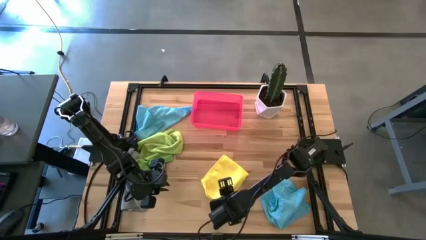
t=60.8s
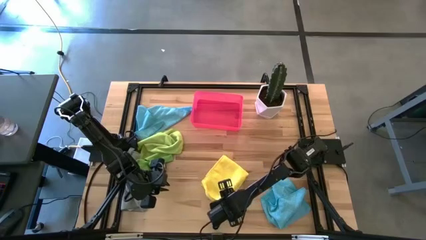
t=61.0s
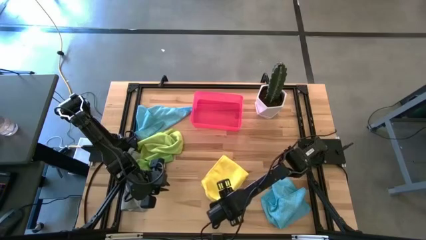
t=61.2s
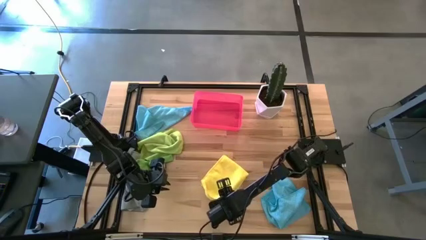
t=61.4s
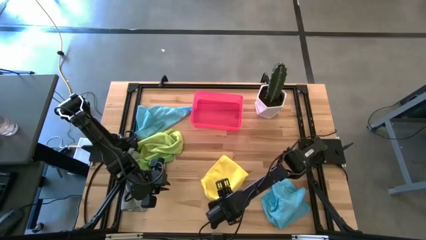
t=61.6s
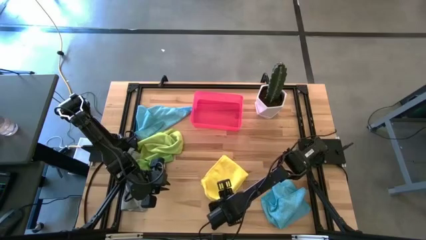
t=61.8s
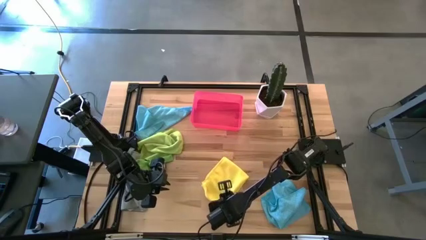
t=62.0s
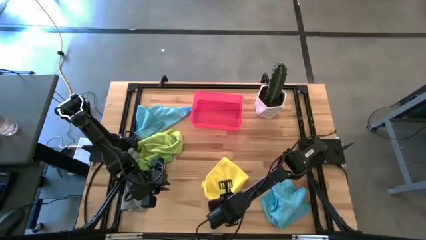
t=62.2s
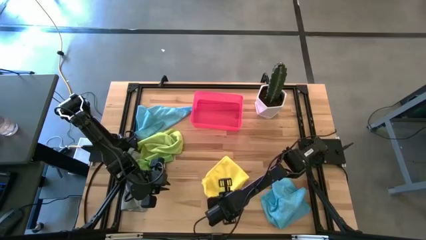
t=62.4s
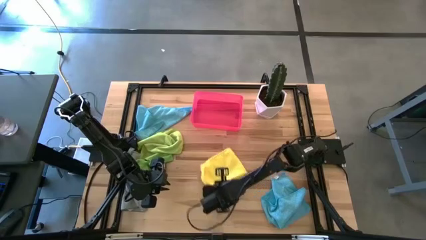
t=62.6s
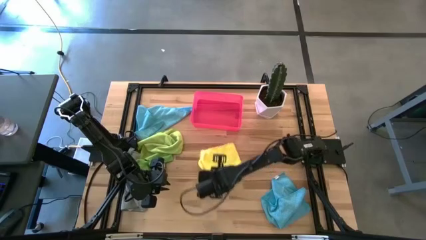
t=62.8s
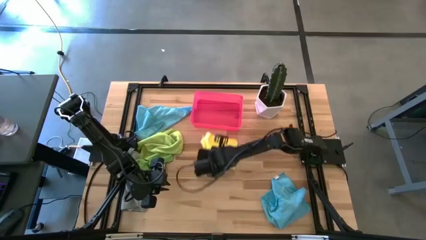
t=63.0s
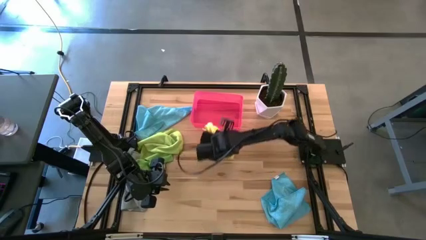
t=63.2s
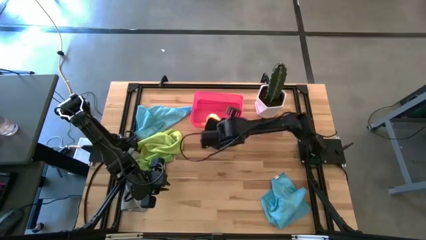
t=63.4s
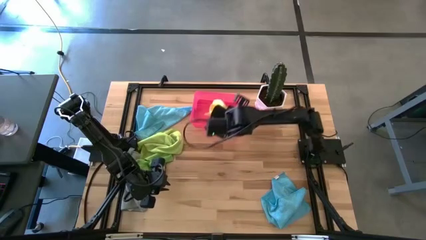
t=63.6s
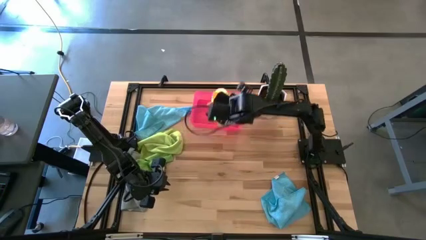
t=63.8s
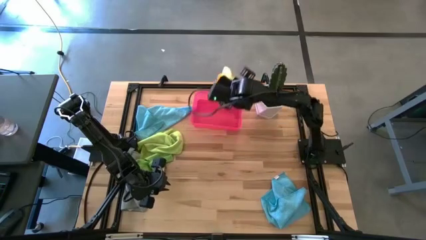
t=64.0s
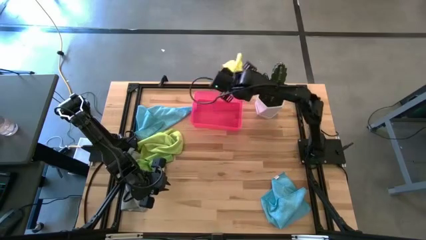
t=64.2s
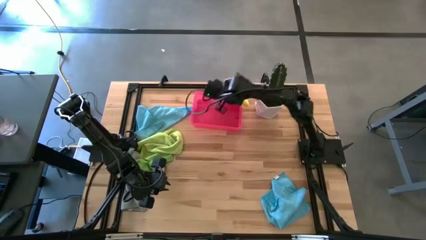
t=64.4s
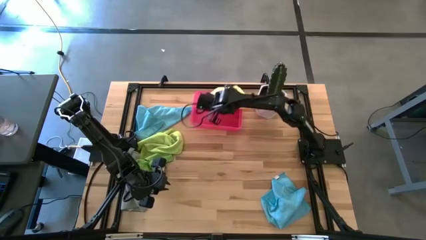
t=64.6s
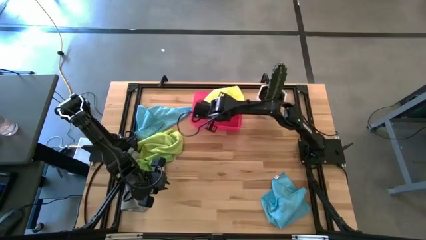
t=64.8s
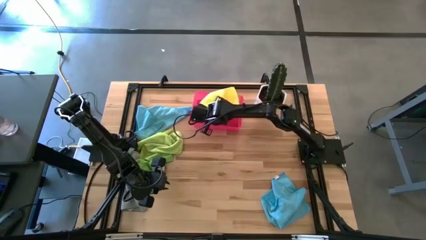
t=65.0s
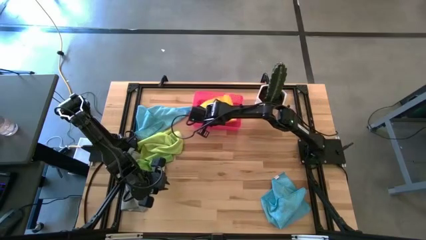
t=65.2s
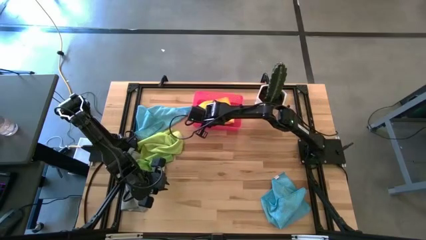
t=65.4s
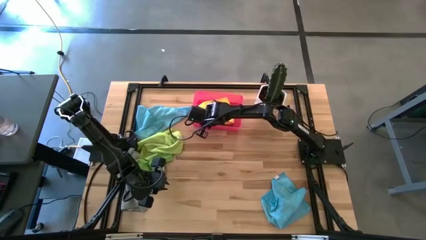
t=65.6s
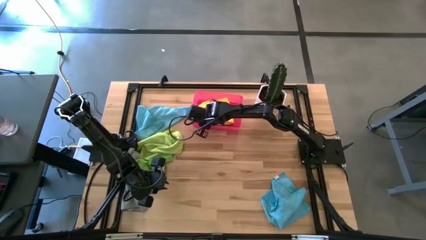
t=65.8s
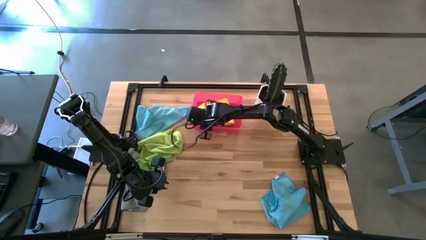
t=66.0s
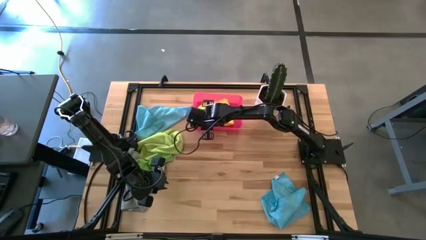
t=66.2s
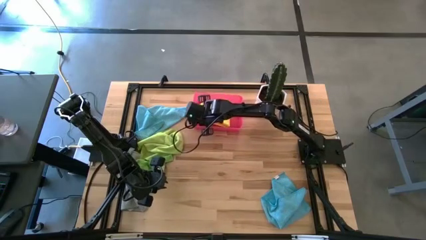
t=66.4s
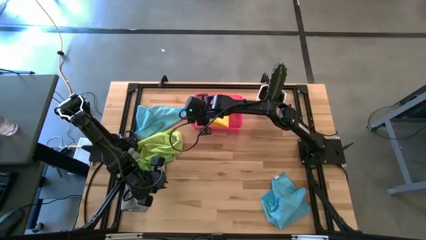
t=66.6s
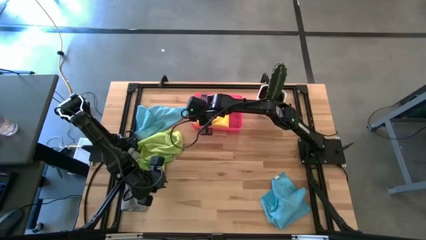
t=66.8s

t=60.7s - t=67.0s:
Task: Fold microfiber towels
Put the yellow microfiber cloth into the pink bin

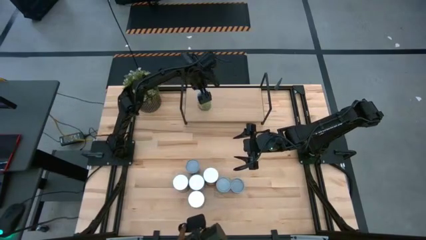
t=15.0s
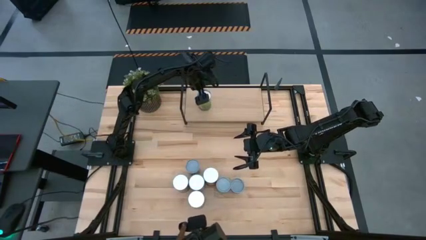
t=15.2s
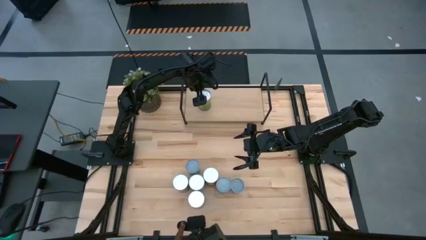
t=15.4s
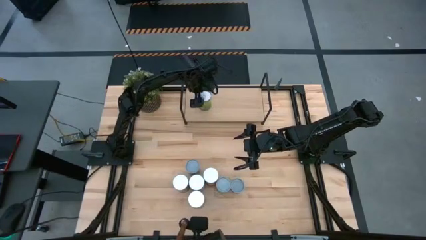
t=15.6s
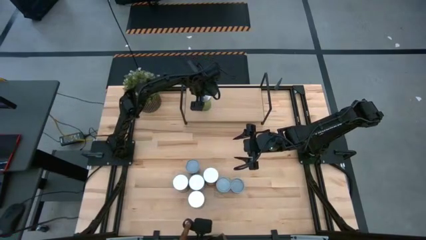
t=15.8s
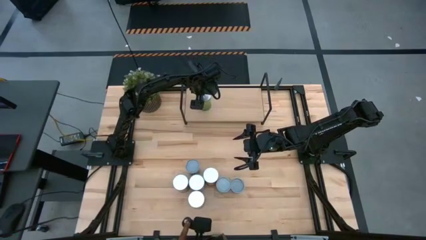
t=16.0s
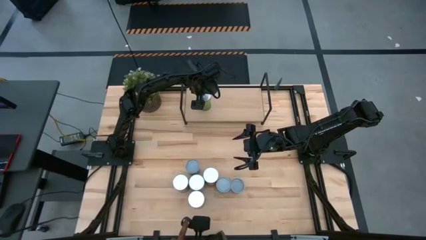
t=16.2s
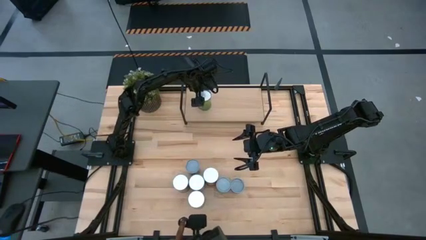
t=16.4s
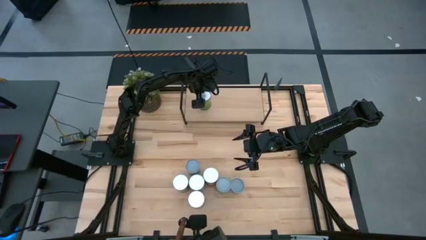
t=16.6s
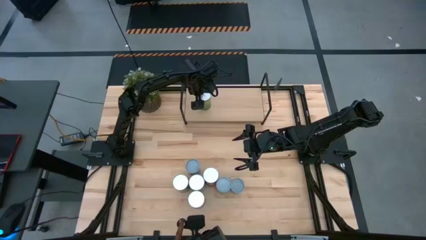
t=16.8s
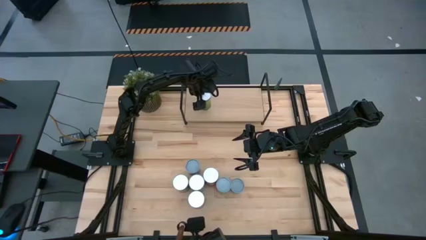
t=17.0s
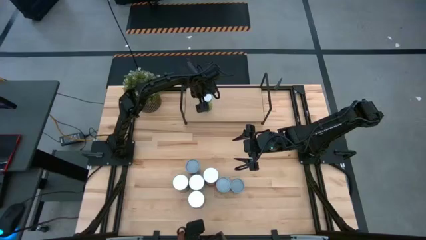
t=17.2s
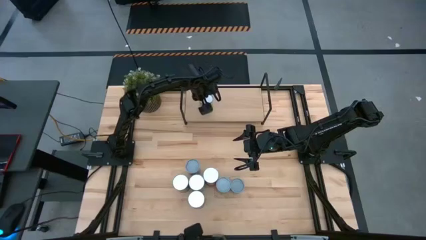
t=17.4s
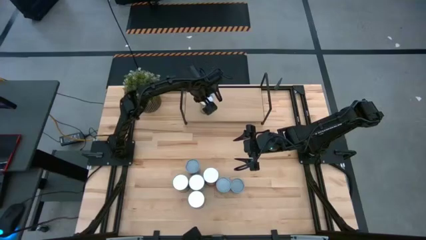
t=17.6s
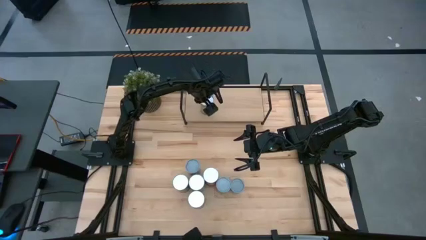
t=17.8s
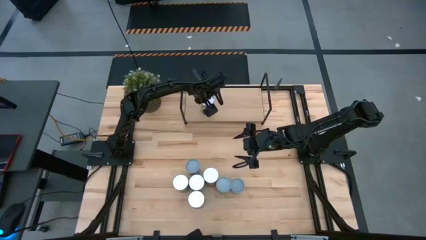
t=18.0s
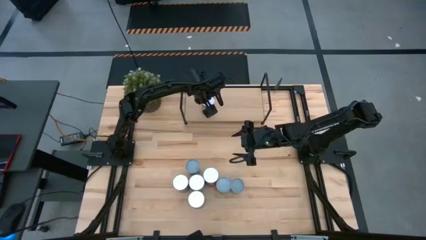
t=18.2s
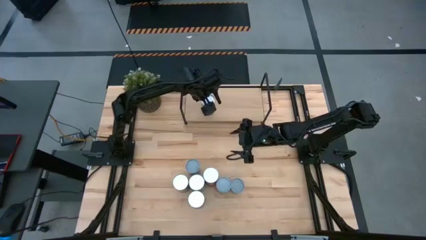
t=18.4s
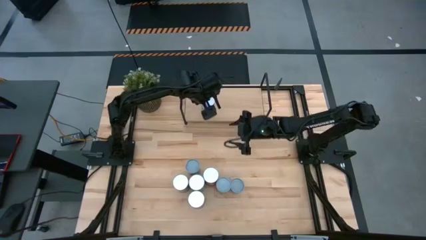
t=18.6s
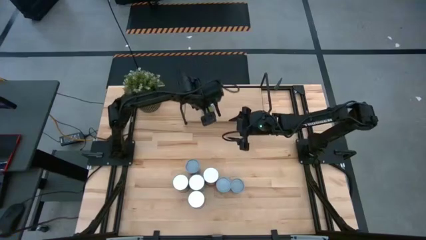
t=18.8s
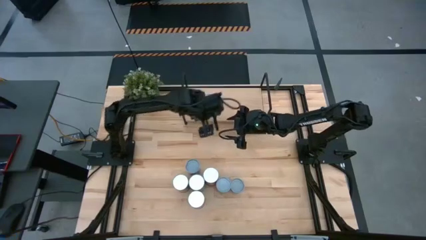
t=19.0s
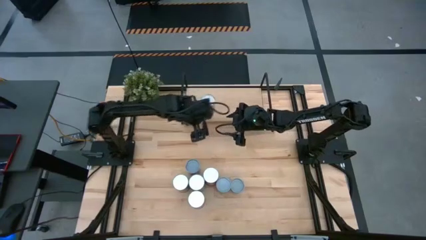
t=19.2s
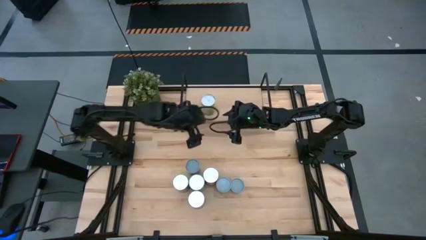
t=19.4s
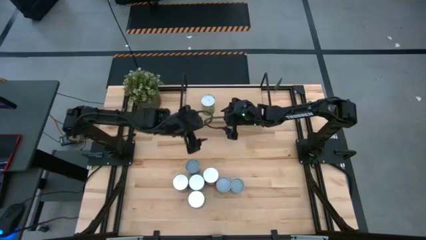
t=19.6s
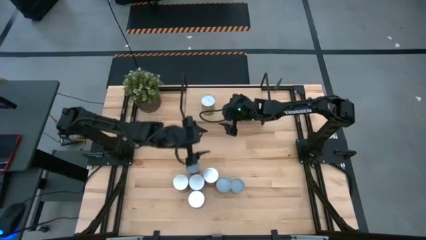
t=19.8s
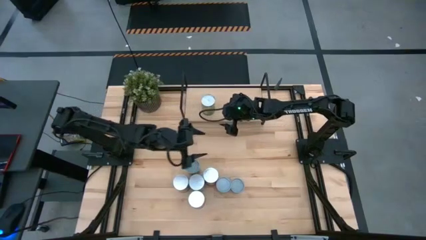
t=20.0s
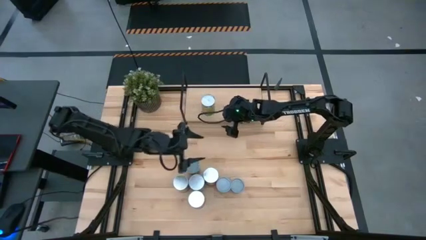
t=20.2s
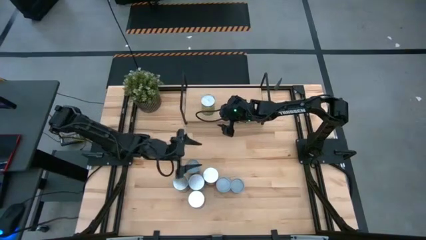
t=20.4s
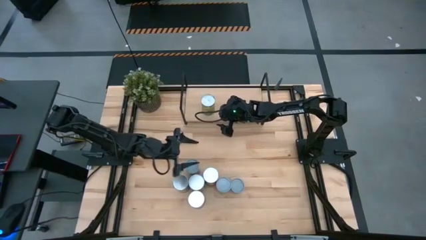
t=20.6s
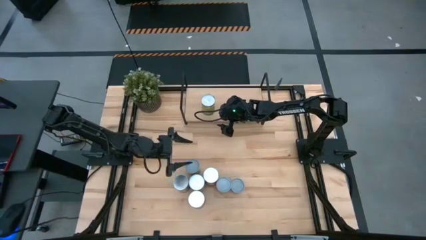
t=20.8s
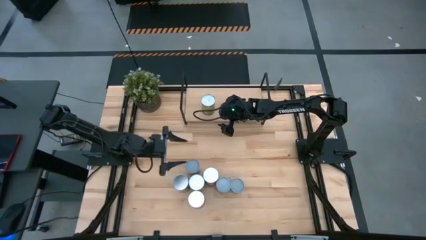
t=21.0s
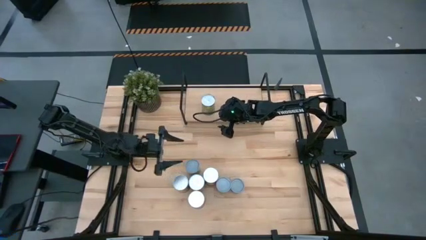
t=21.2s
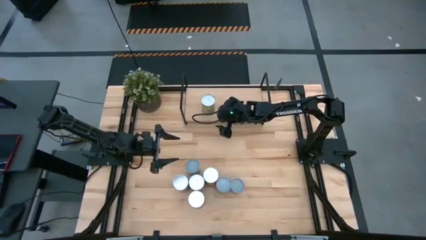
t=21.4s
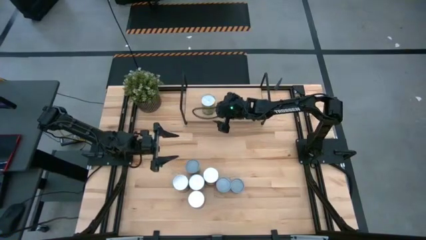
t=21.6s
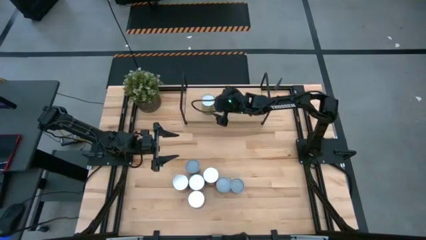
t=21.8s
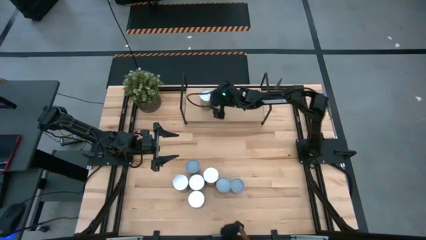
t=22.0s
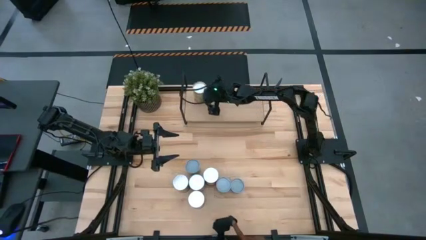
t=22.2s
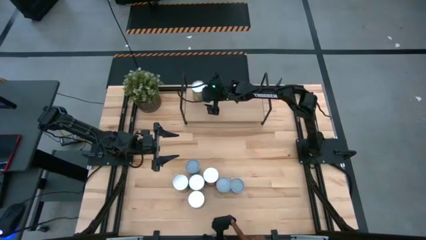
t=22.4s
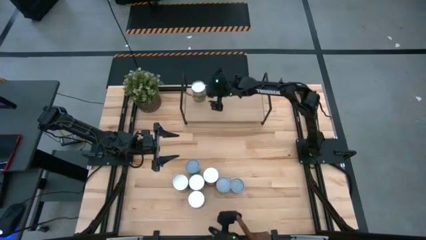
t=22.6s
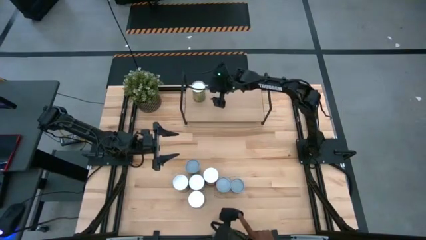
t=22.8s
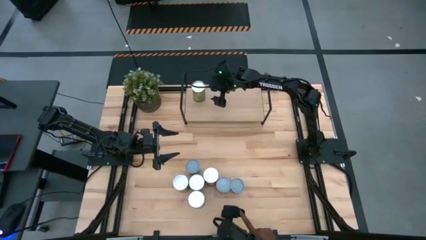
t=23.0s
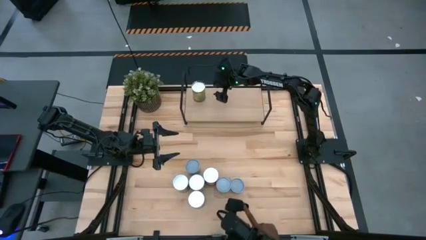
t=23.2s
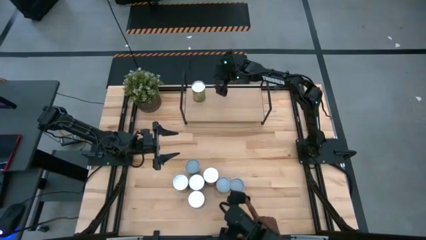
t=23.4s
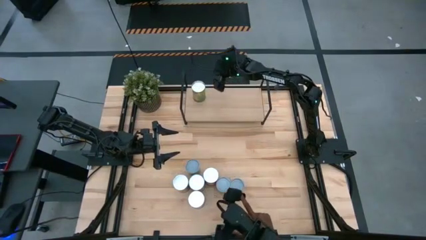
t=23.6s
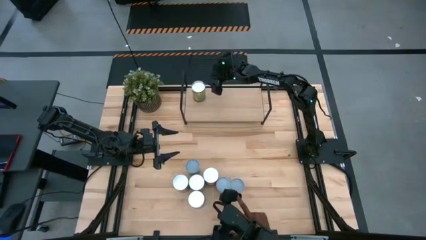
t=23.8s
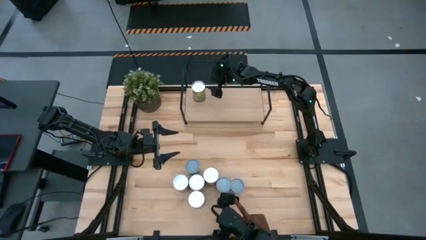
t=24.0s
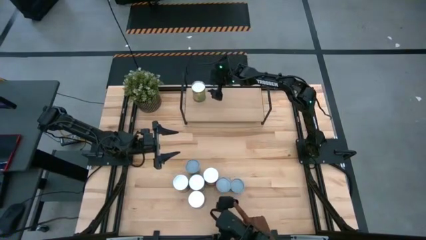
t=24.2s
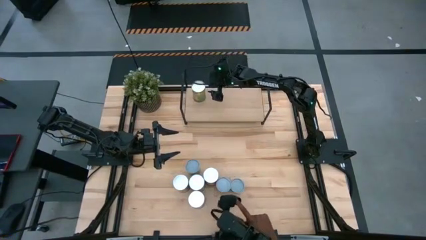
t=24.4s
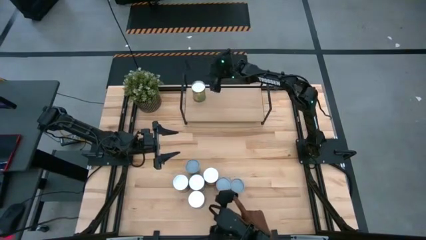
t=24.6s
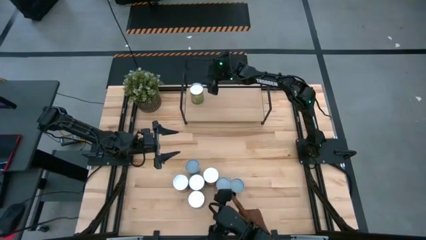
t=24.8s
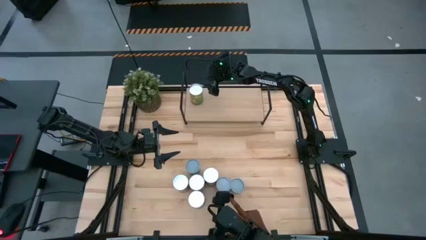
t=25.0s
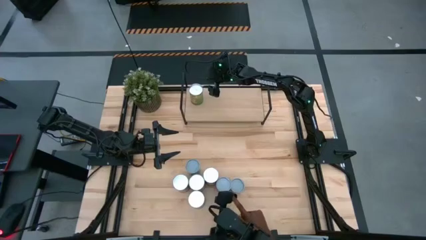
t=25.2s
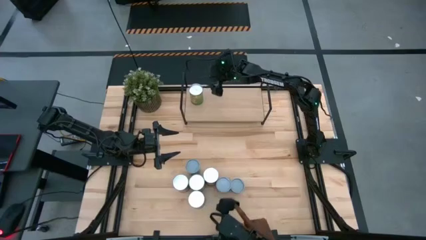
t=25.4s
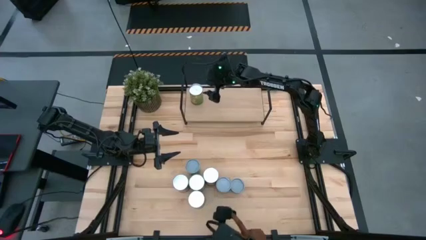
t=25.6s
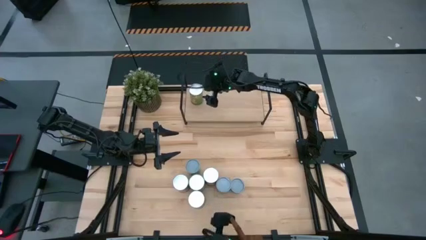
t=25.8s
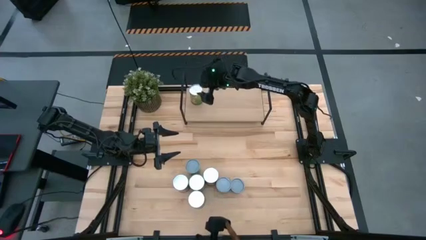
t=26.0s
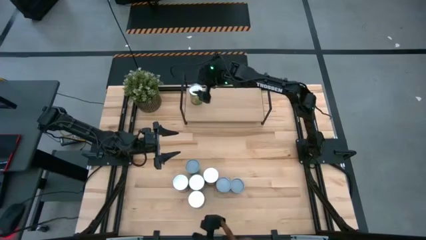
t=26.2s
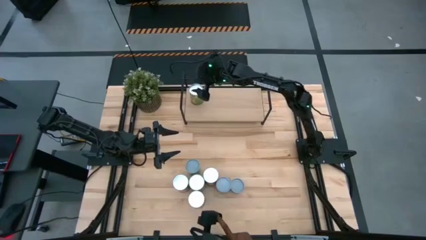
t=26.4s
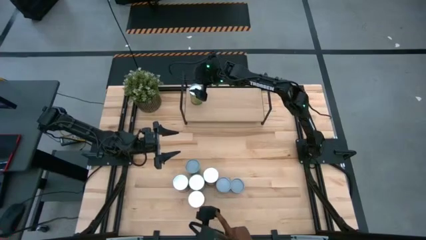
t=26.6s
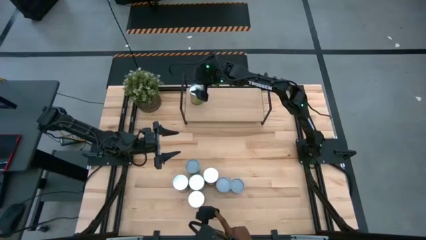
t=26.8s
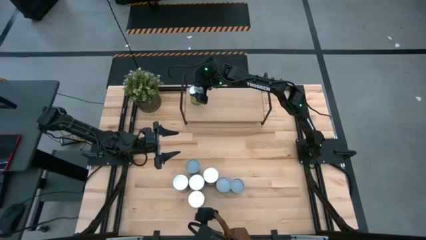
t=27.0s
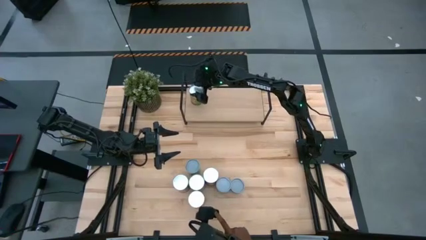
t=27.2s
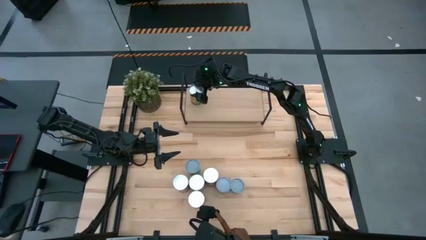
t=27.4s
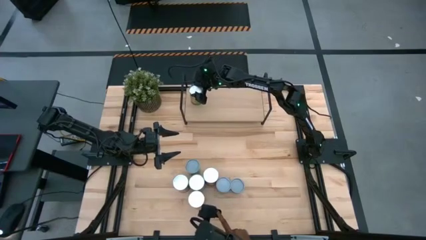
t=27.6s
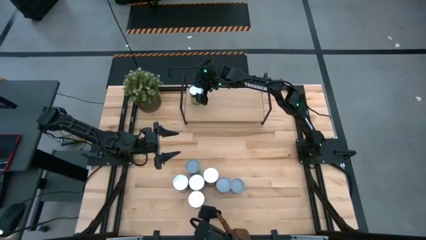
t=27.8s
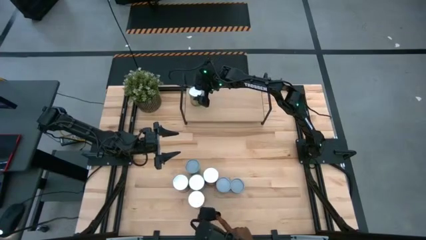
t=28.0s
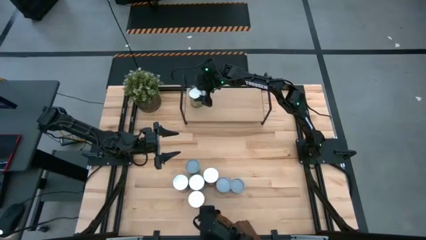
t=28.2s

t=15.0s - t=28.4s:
Task: Pick and place cans onto a shelf
Put the canned oranges on the shelf
